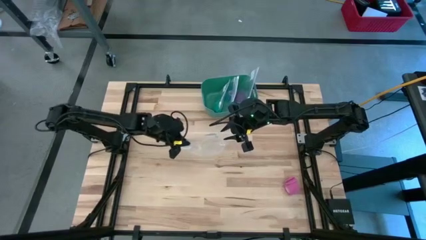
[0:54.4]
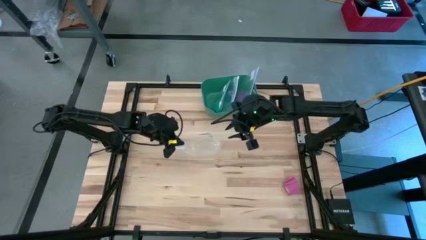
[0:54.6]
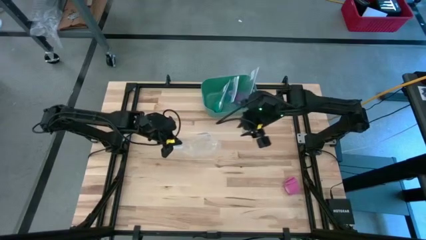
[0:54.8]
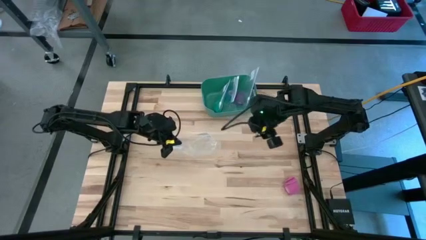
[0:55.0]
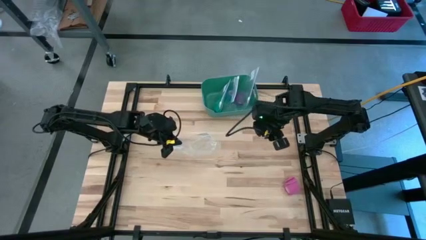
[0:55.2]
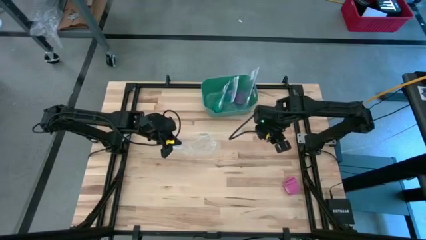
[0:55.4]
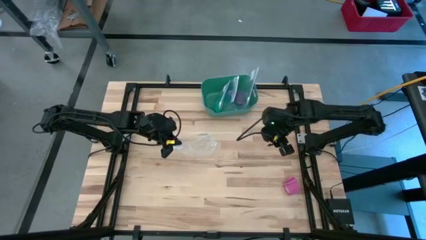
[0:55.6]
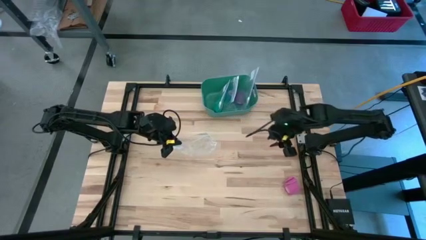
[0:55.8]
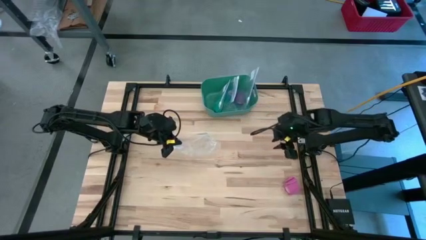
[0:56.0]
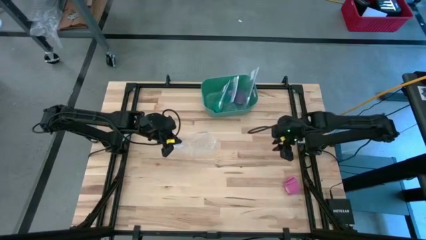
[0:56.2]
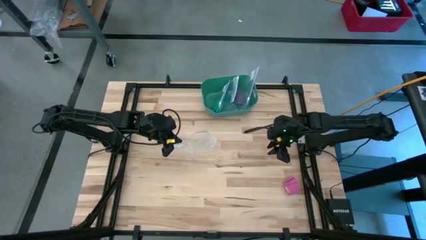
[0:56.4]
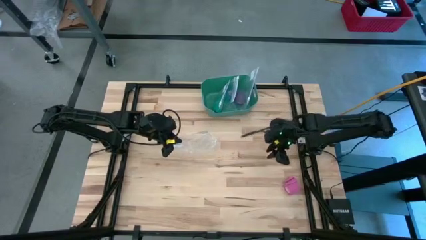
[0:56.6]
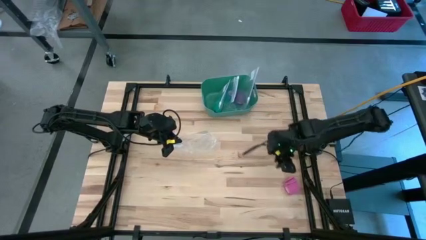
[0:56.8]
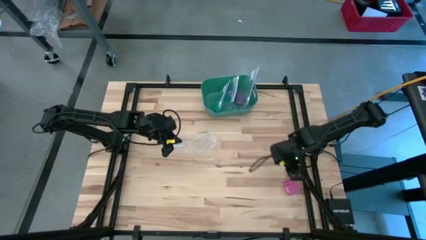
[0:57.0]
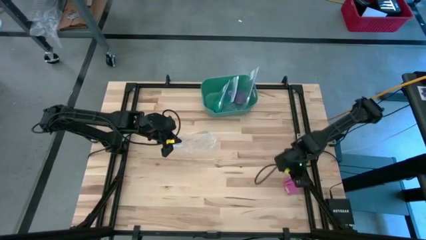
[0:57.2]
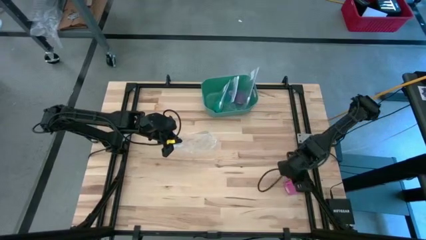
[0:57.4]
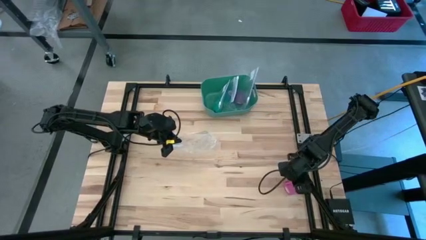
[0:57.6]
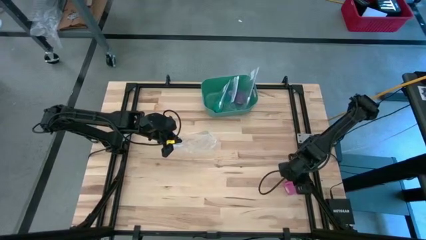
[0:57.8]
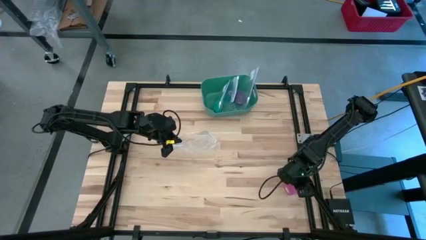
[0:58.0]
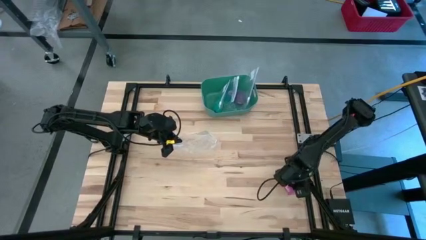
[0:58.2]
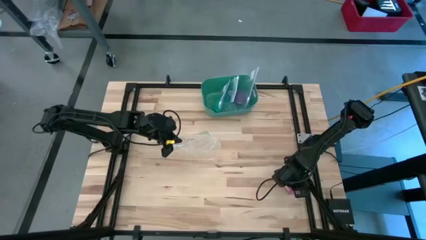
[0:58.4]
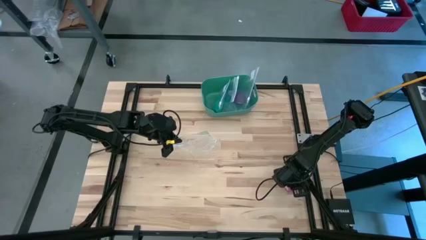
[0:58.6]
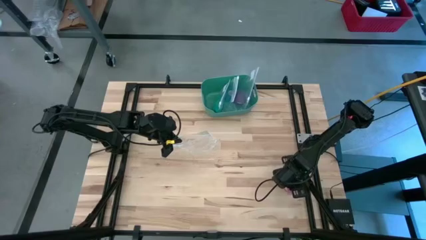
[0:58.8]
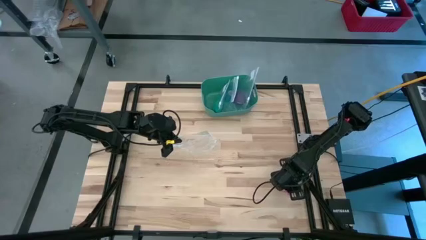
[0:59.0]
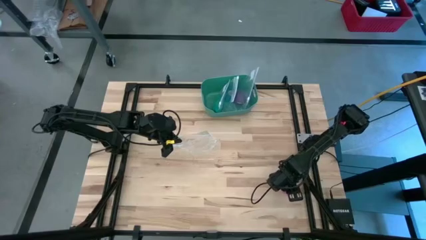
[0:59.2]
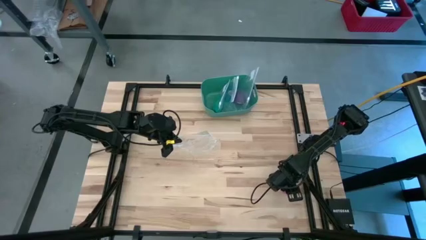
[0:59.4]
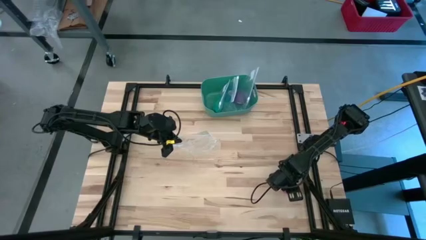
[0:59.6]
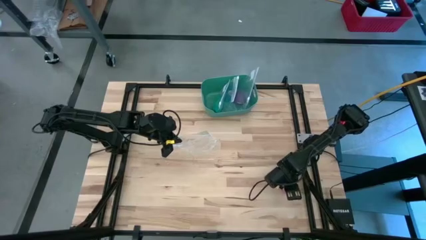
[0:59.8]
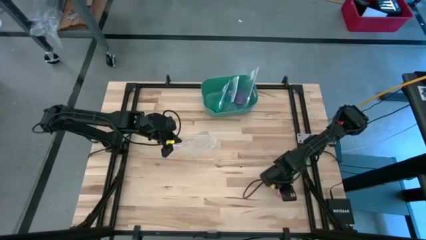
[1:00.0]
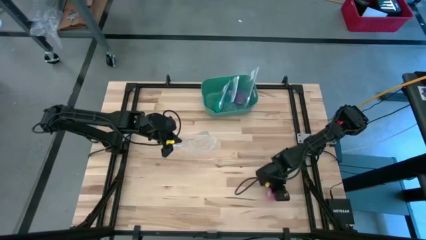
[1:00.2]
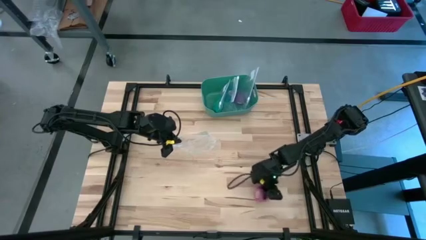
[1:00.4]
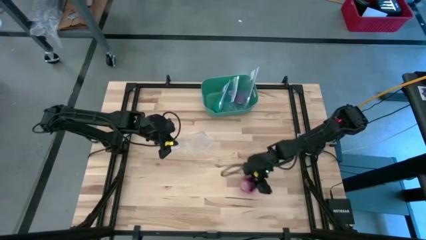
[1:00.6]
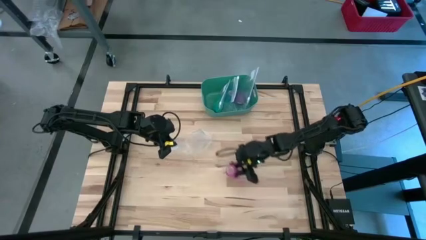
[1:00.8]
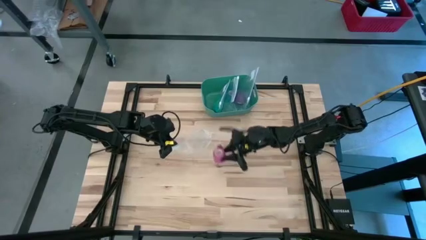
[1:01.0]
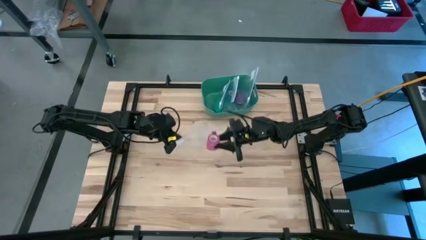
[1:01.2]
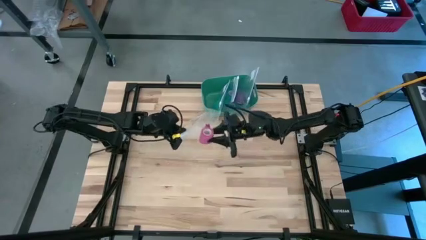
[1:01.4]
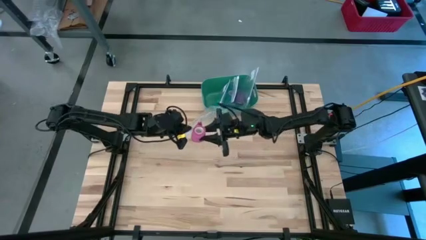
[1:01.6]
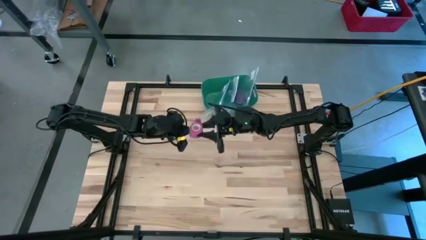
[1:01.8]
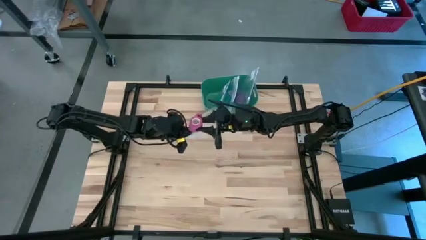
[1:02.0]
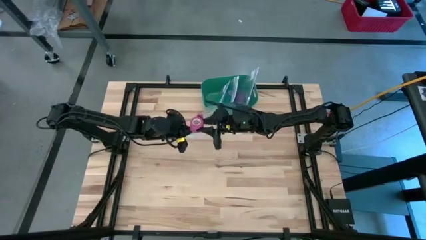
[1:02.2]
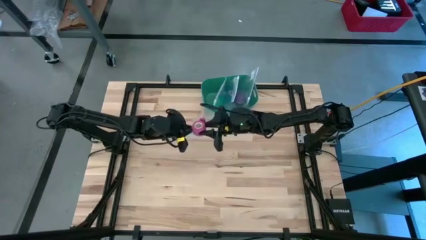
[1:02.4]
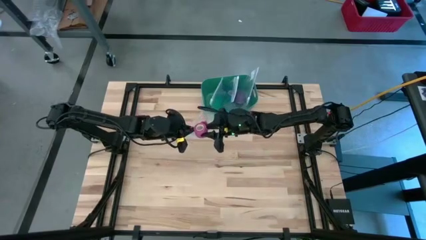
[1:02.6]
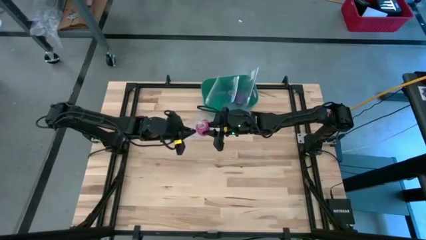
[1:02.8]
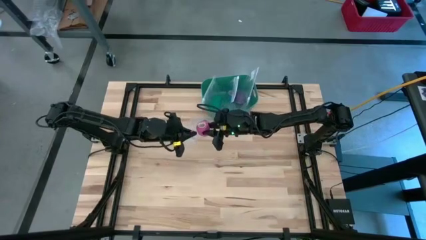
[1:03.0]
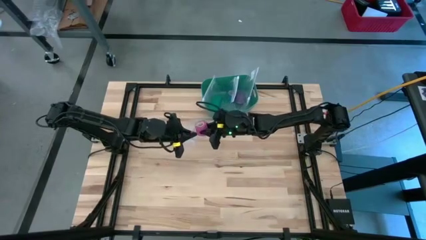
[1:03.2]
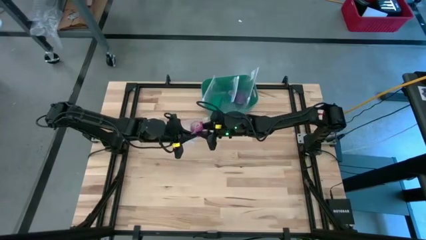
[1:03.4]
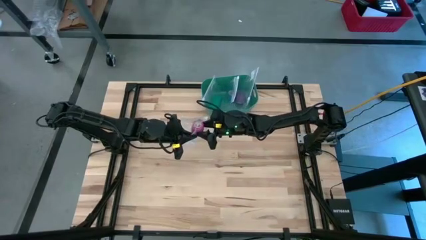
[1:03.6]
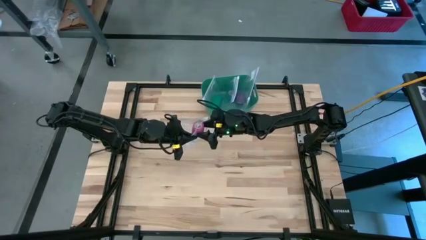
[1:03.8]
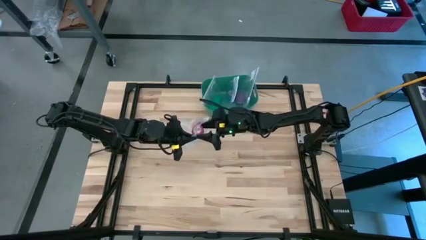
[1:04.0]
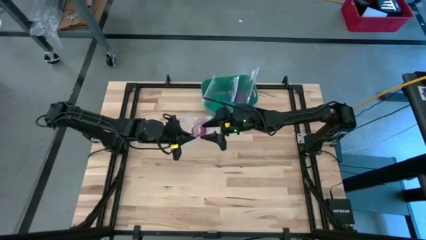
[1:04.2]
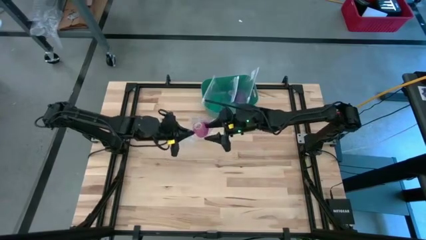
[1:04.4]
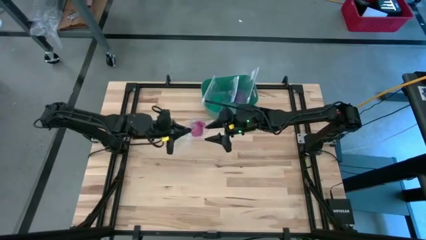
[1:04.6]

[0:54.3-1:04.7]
Task: Roll bandage
Put the pink bandage into the transparent zip bag
